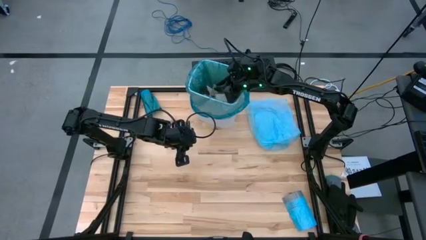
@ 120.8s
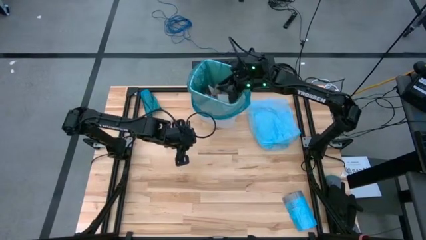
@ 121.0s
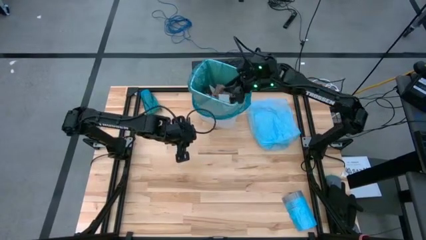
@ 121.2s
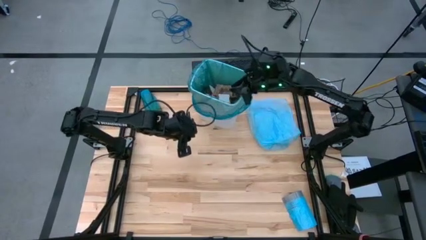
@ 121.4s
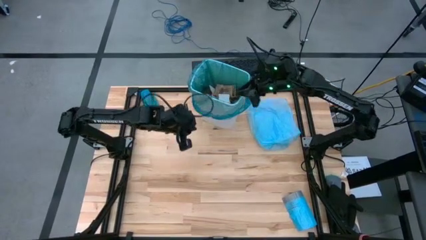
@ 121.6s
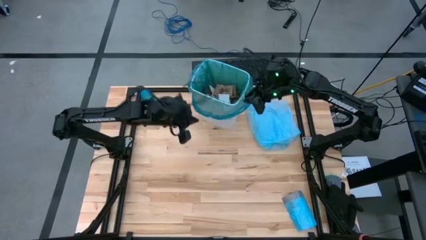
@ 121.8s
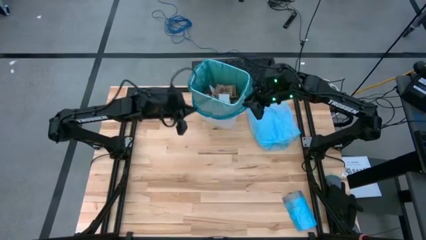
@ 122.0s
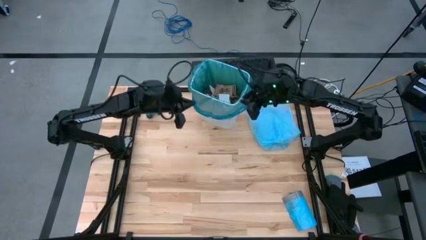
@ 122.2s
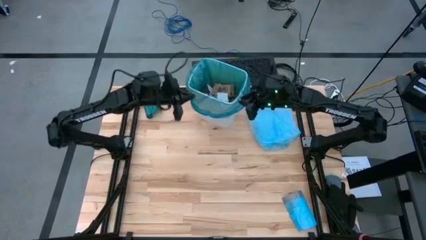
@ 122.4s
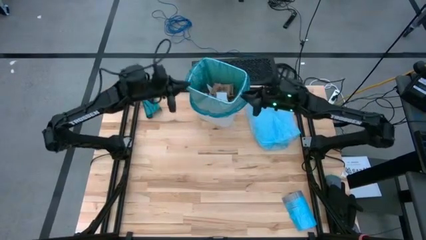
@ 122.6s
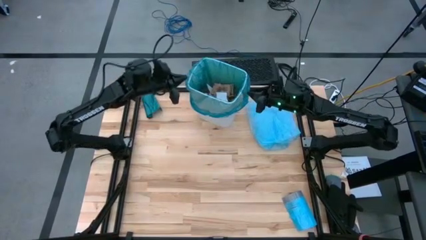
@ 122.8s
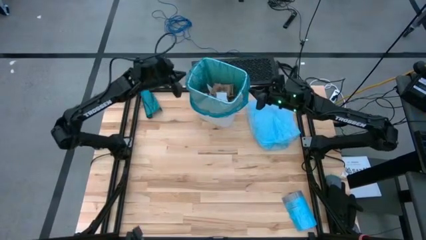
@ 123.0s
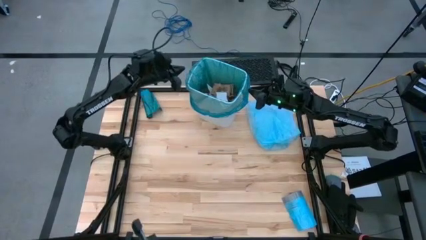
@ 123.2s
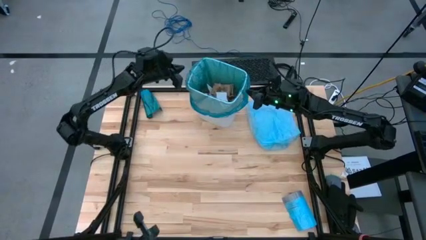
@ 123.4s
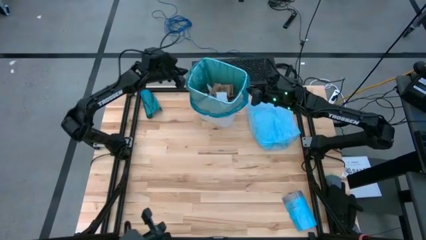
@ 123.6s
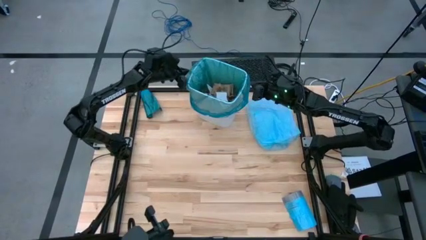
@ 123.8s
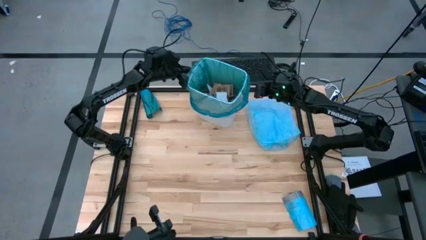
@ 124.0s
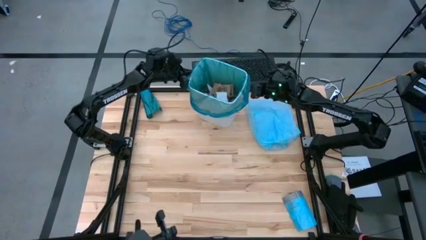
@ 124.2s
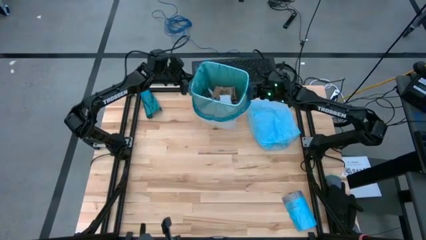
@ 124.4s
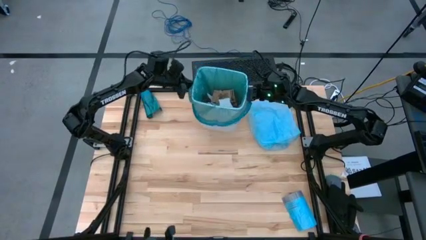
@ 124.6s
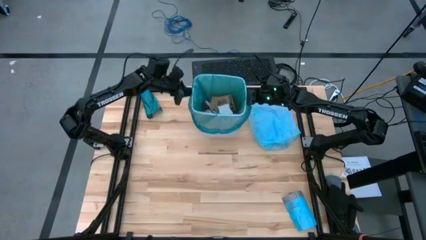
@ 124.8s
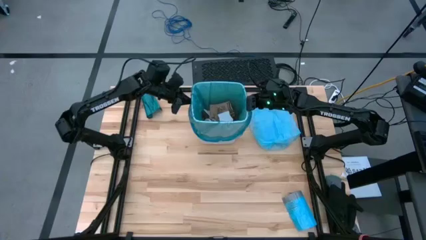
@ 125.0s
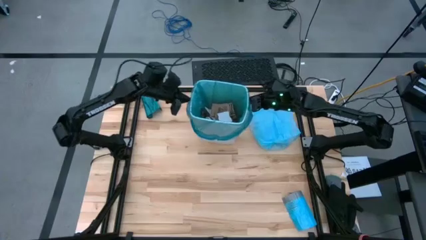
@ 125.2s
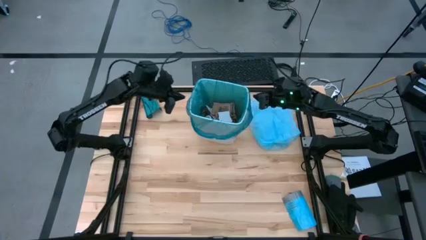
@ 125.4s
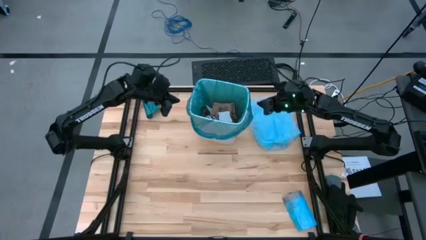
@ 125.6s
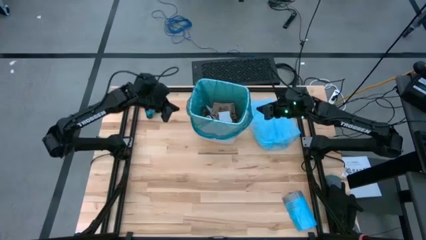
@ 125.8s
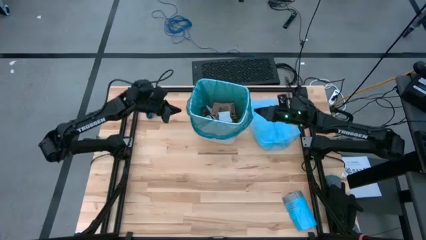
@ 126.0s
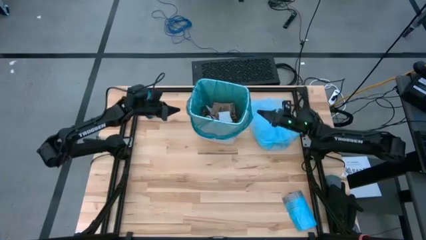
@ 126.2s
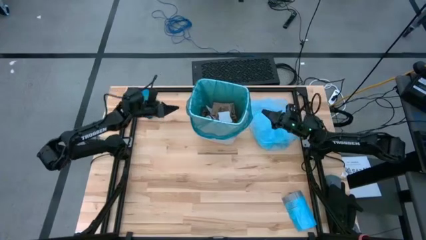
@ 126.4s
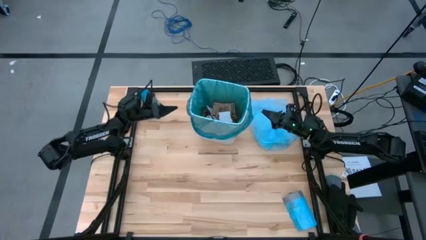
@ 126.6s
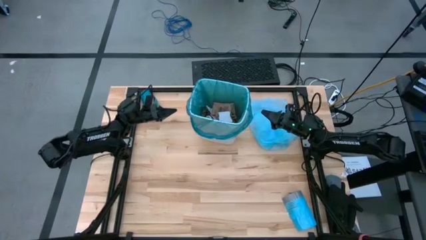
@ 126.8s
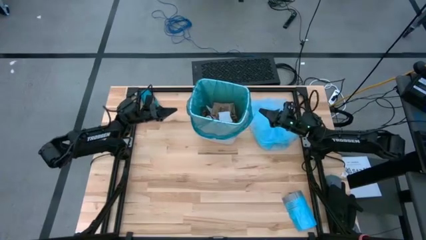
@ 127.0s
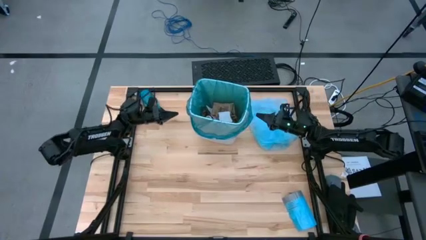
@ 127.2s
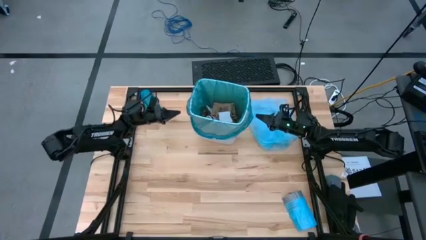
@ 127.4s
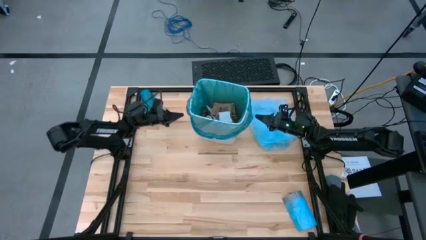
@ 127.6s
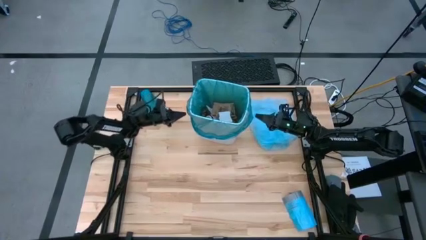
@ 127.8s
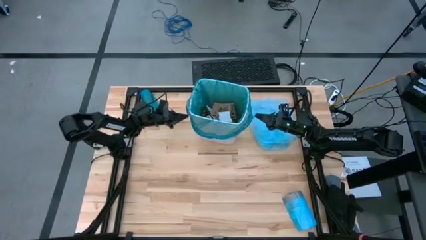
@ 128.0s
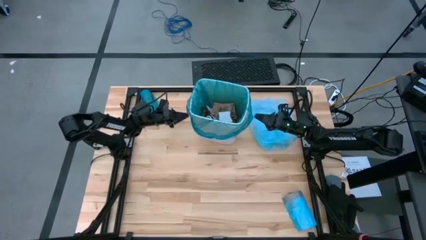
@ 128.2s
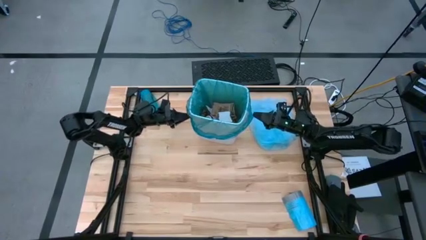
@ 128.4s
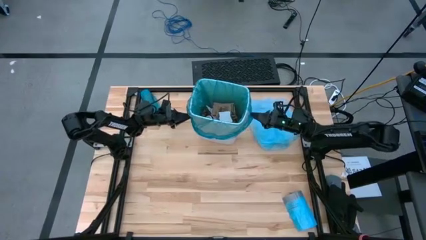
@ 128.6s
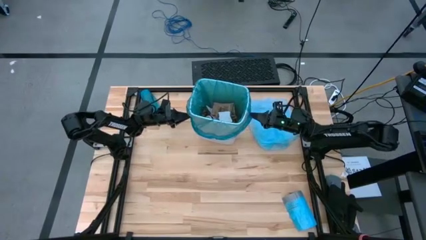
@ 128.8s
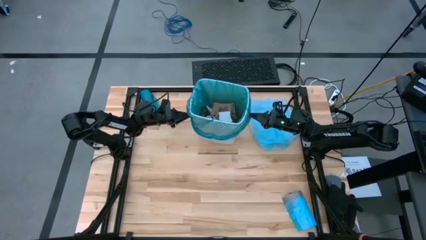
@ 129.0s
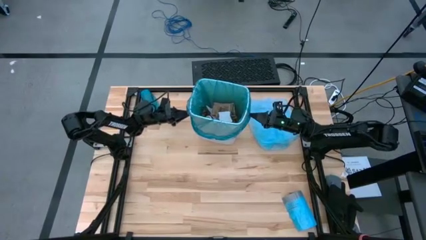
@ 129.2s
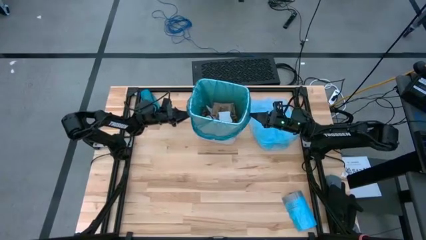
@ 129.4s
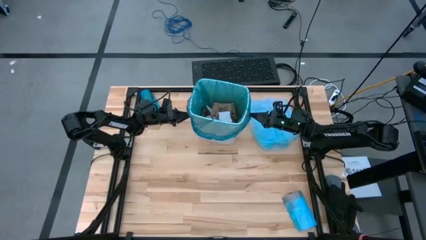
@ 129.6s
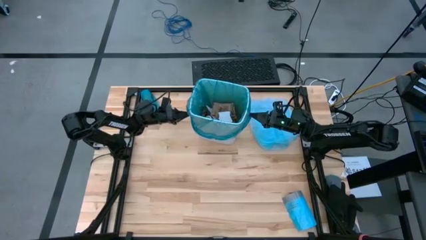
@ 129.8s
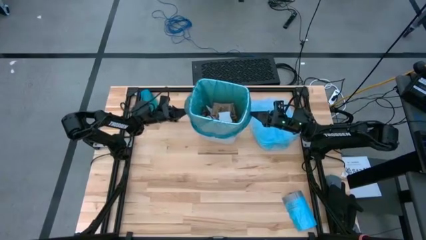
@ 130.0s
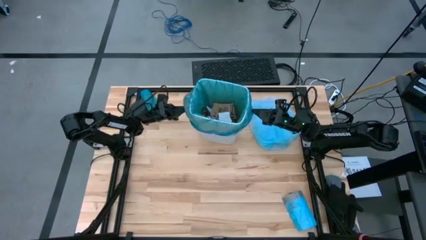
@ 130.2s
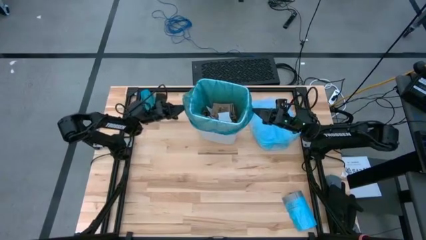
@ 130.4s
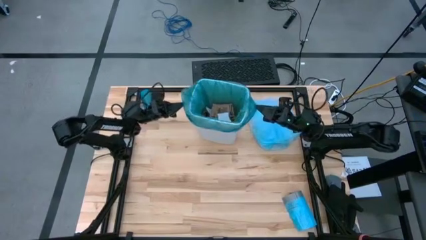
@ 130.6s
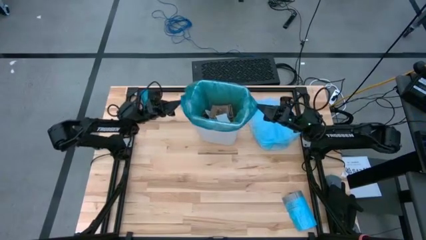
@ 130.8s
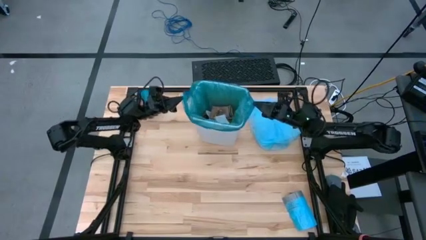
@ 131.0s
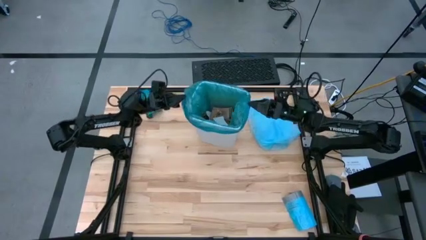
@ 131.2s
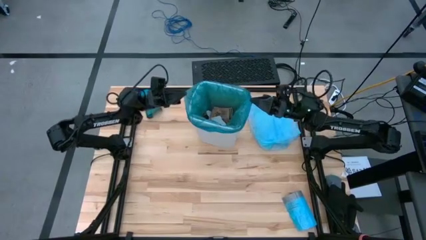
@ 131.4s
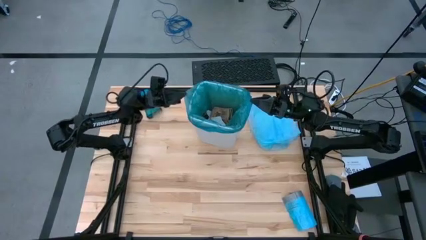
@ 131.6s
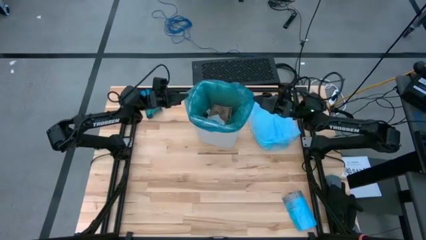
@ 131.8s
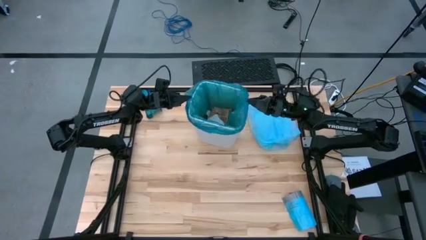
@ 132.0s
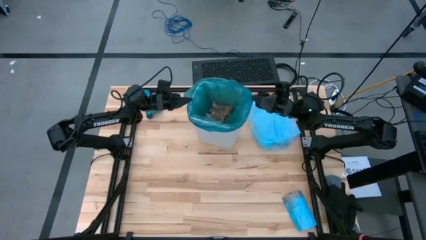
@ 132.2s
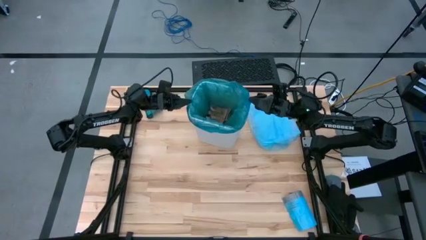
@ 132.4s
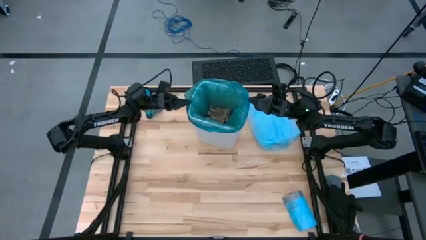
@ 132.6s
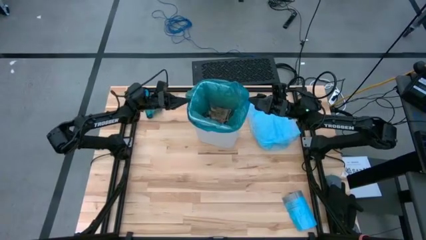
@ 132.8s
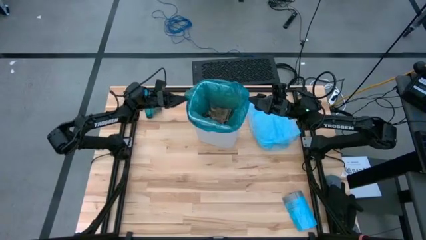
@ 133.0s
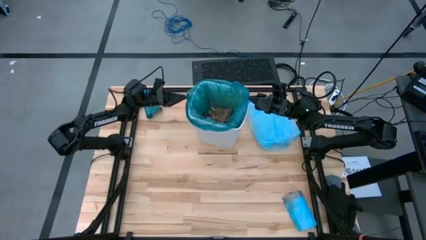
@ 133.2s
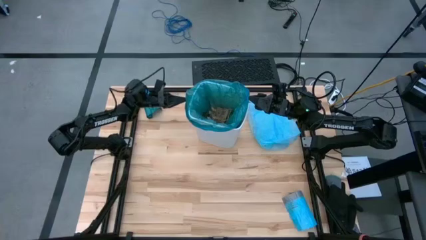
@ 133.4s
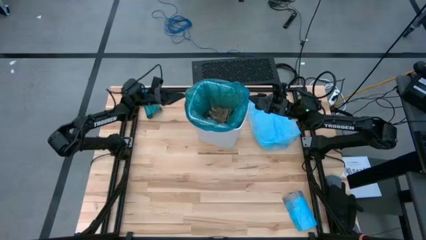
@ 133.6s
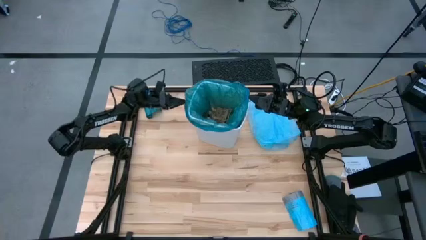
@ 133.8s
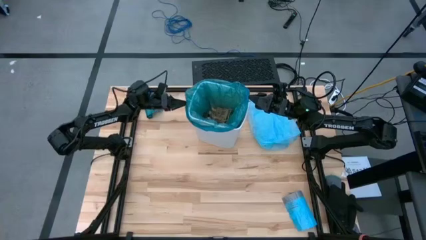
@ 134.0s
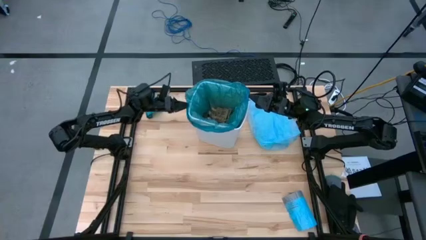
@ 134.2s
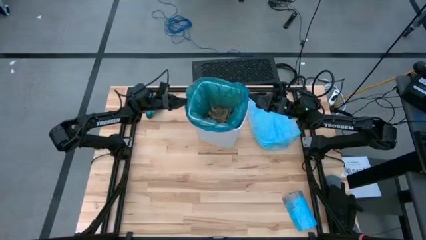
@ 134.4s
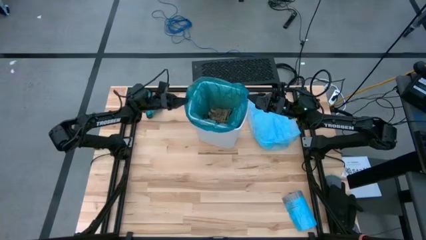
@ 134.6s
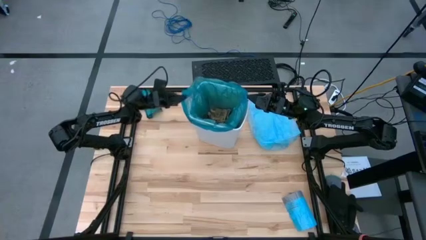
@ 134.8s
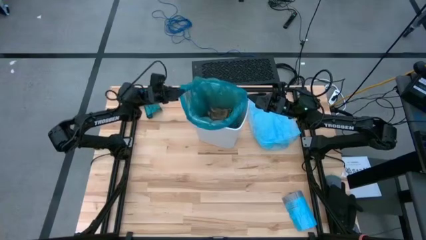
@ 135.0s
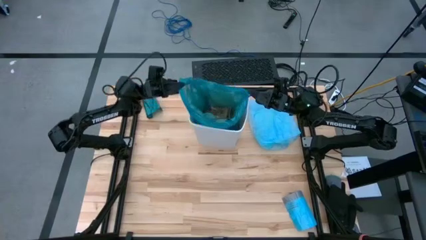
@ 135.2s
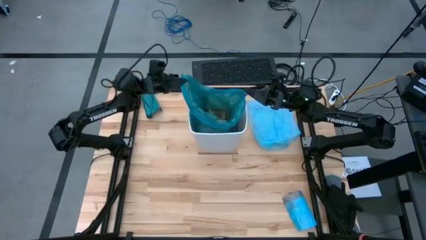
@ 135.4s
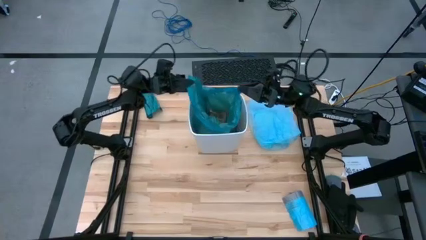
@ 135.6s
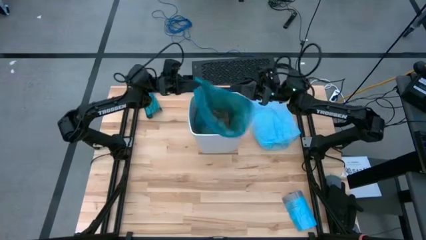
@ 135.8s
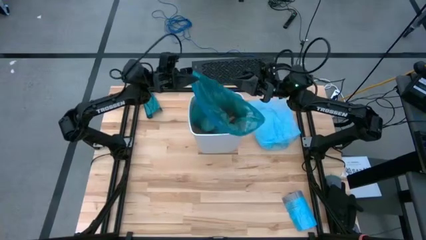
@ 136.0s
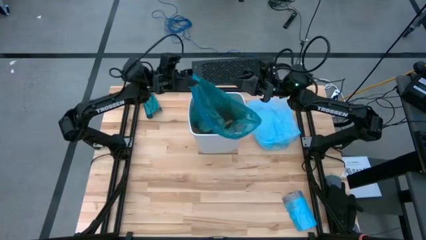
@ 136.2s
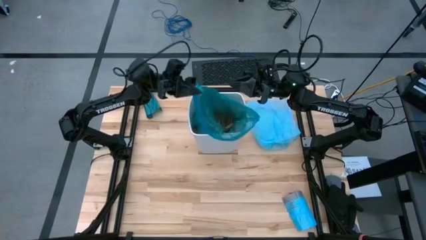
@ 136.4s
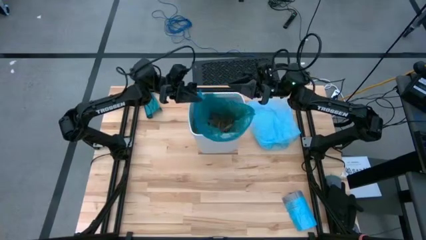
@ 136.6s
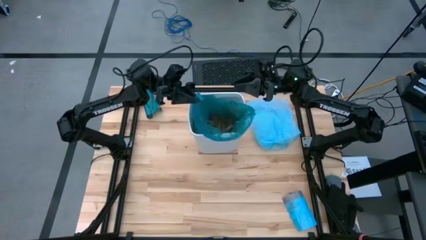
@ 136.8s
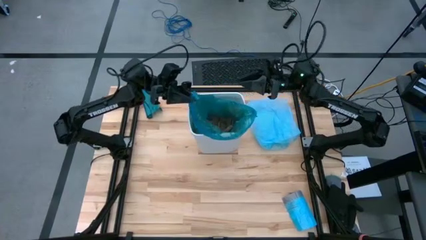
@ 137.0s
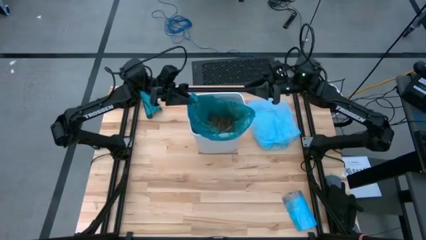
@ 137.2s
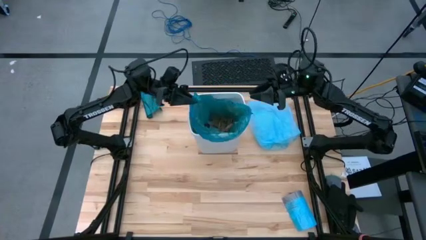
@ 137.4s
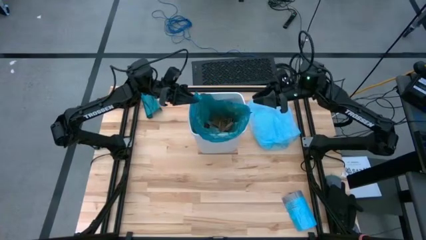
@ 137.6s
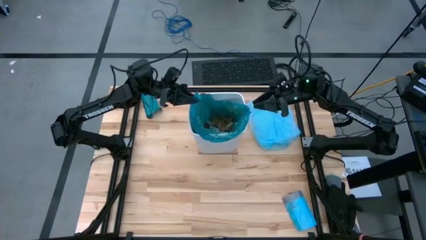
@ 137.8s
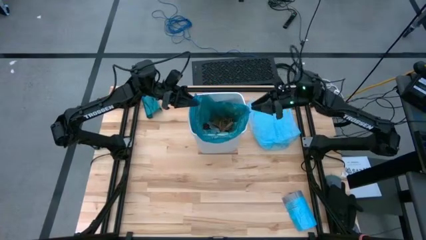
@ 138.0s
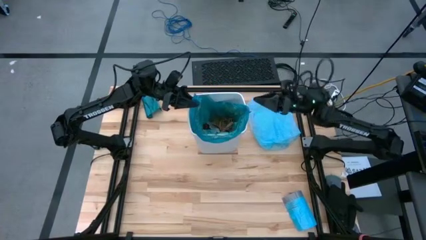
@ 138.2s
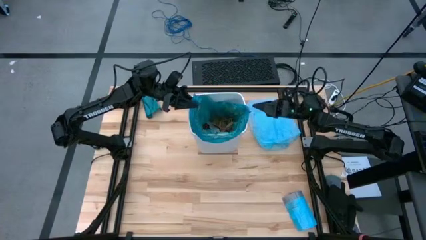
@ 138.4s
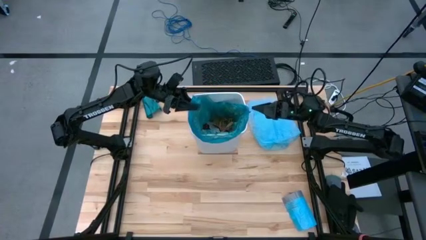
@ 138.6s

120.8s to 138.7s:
Task: place trash/remove bag and relplace
Remove the blue trash bag from the white trash bin
